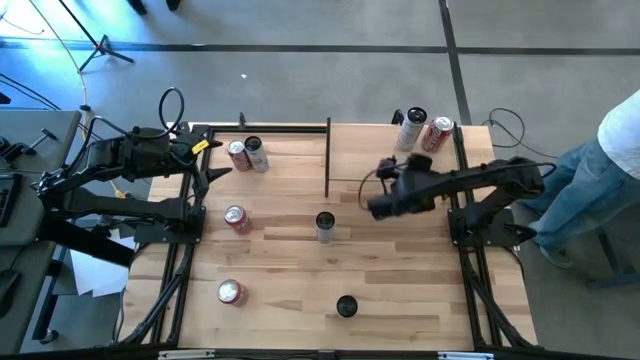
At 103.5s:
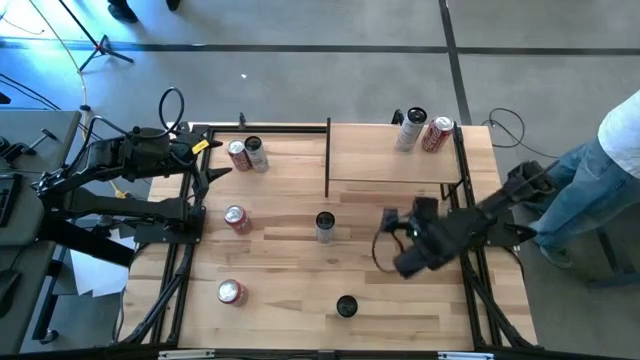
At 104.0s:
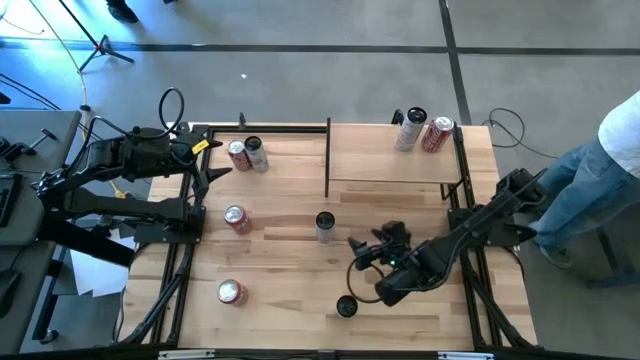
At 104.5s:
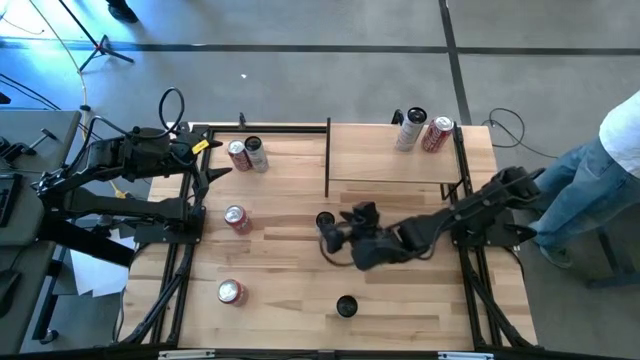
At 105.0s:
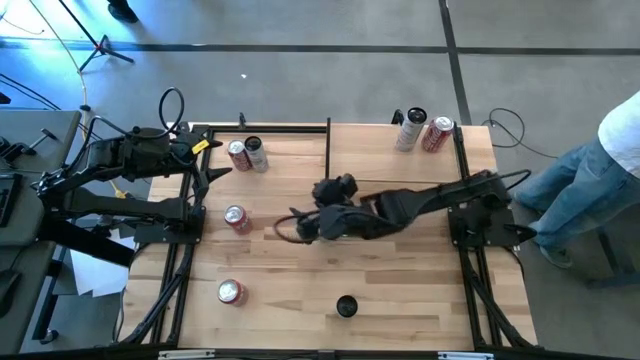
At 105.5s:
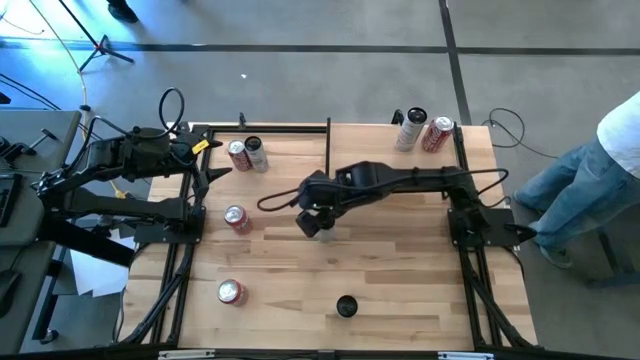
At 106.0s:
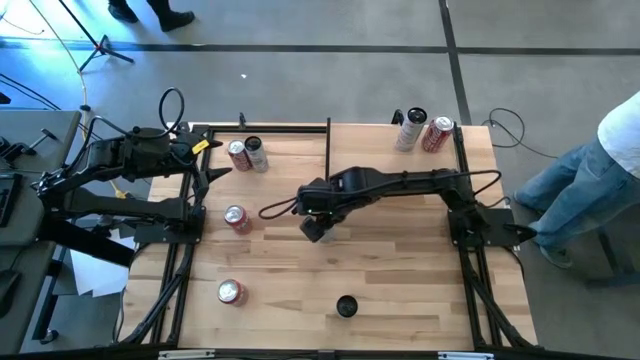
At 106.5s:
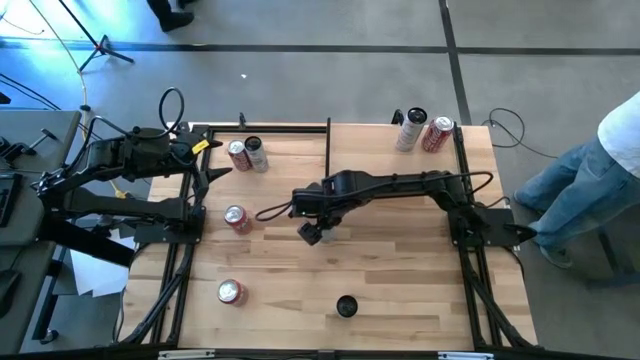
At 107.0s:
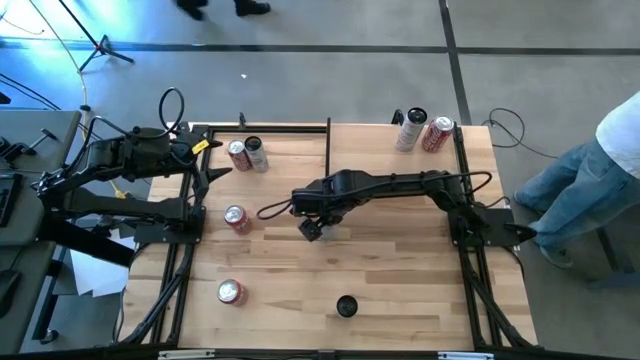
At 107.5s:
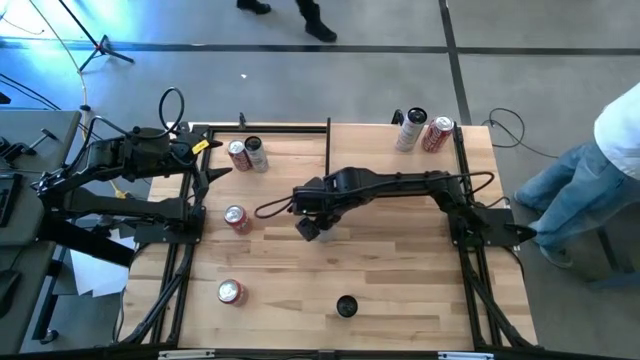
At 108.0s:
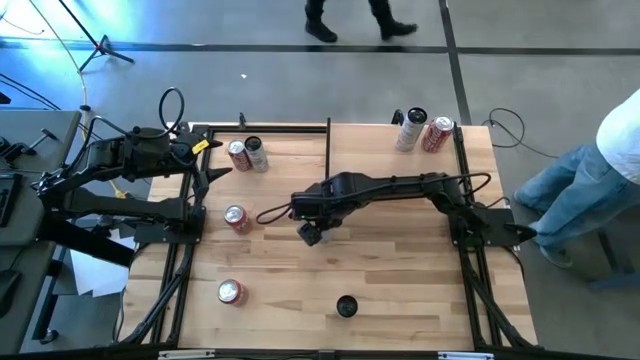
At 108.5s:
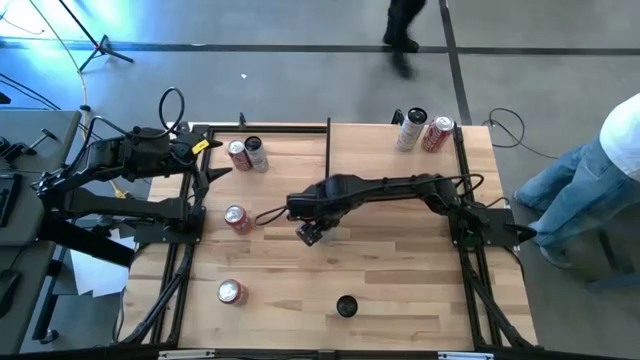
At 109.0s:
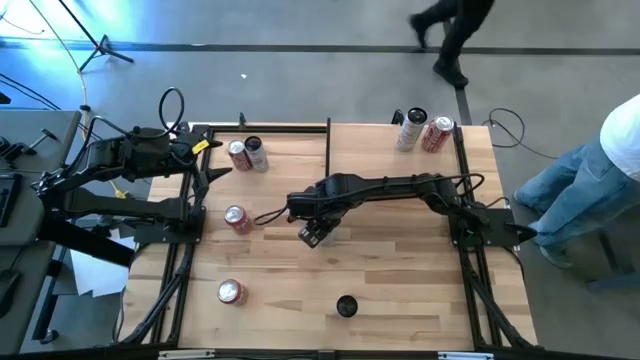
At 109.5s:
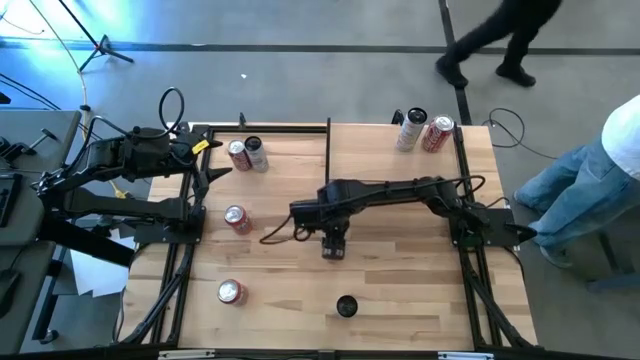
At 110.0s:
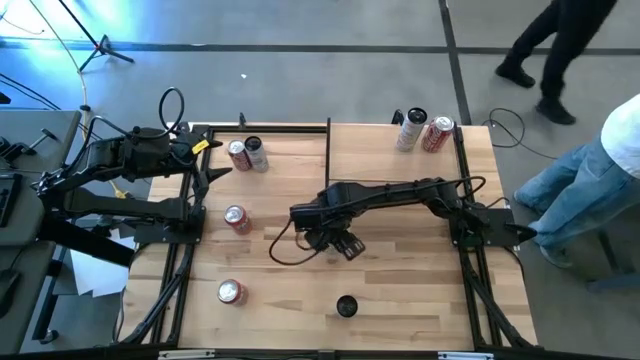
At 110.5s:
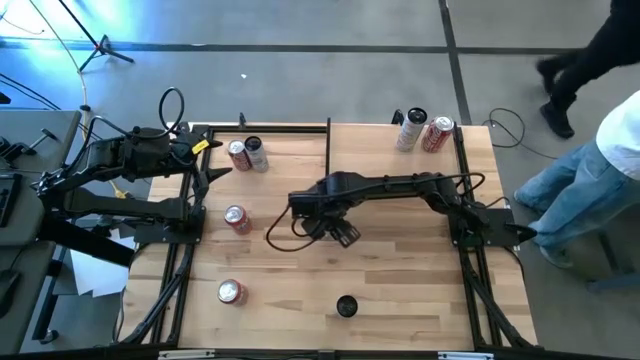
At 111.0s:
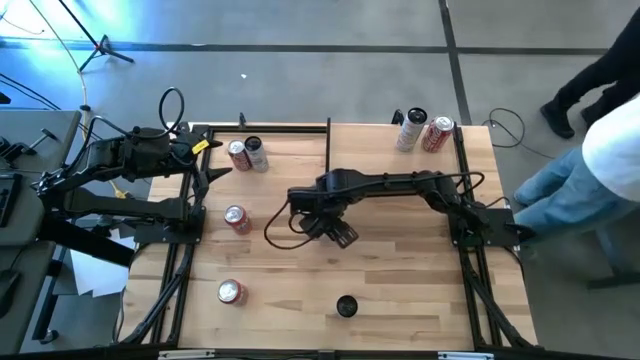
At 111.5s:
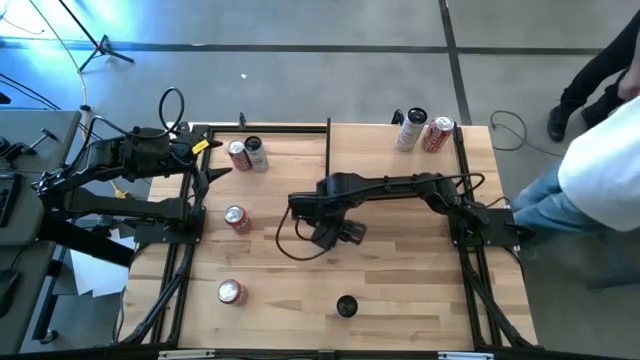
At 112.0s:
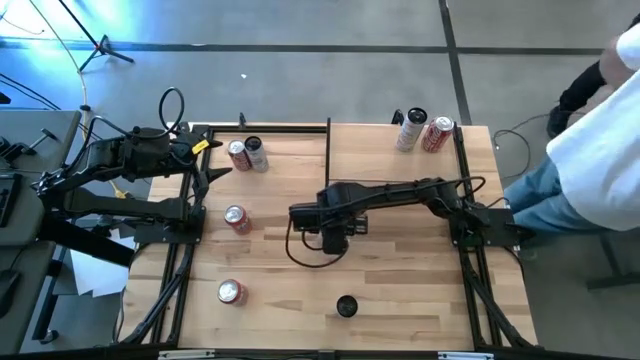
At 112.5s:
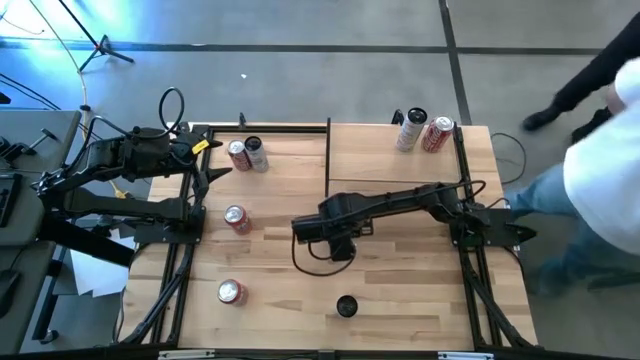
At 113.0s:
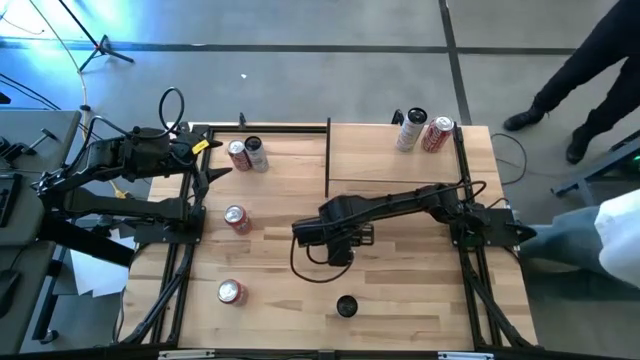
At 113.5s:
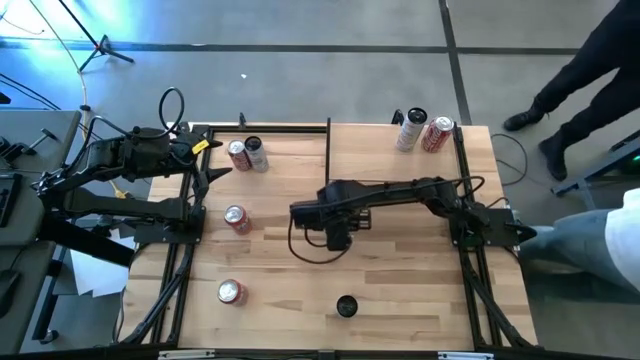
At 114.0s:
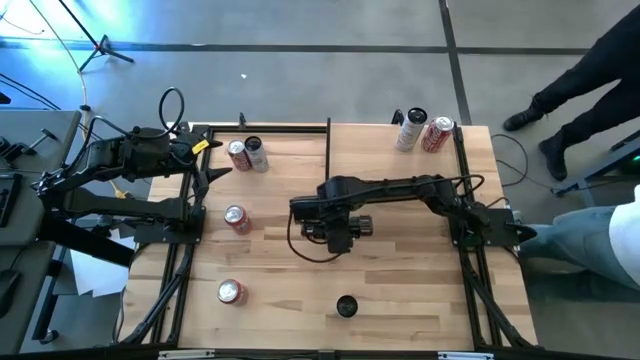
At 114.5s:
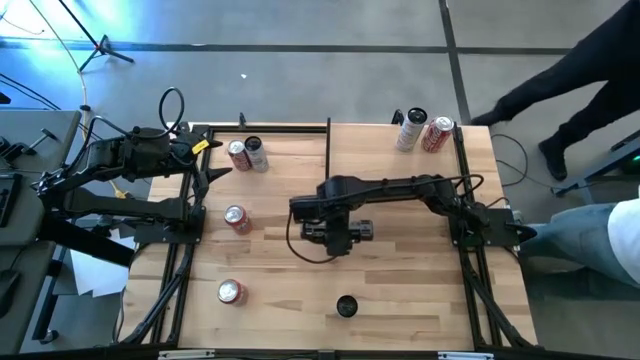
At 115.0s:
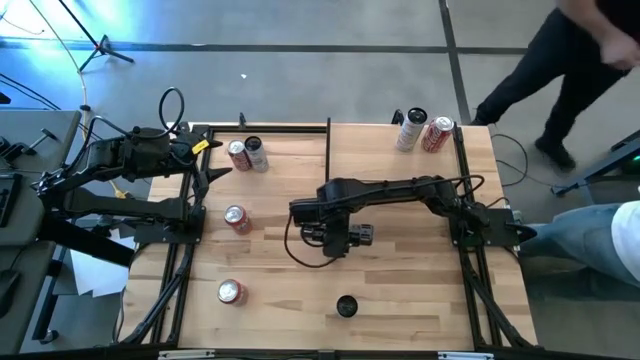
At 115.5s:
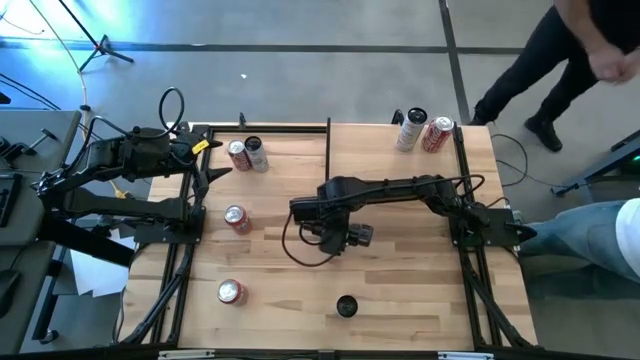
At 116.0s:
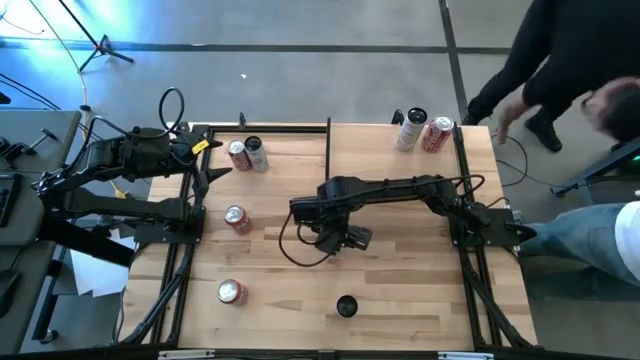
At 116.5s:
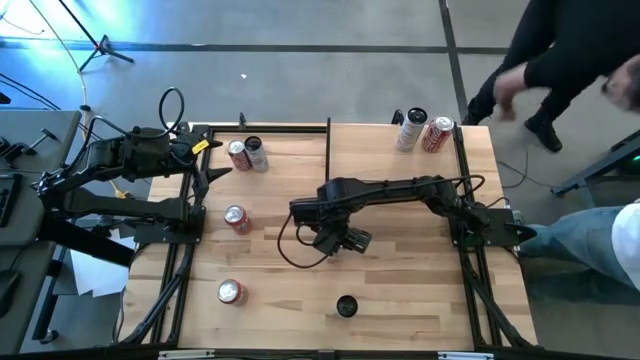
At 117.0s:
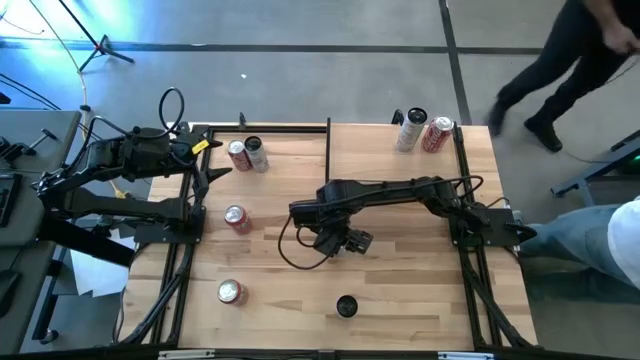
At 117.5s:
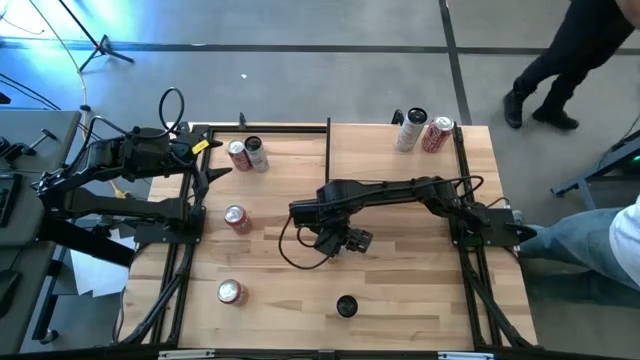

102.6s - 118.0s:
Task: Place canned beverage on shelf
Put the white soda can on the shelf

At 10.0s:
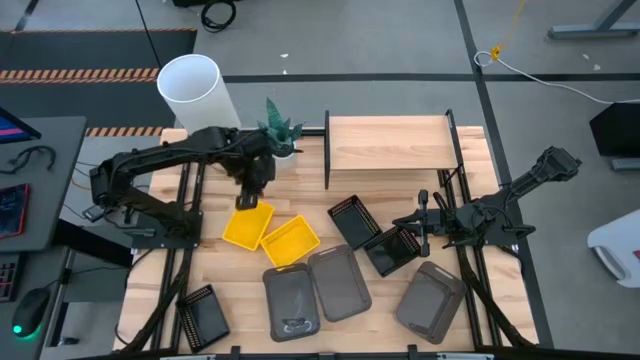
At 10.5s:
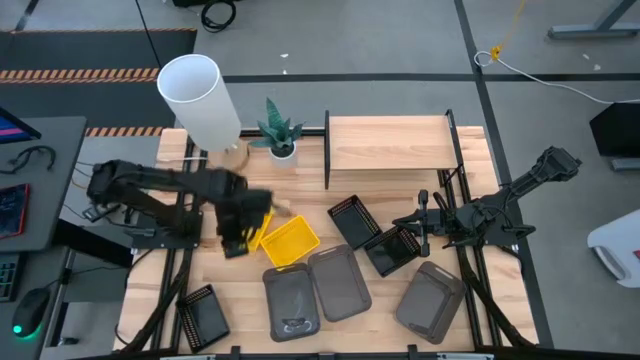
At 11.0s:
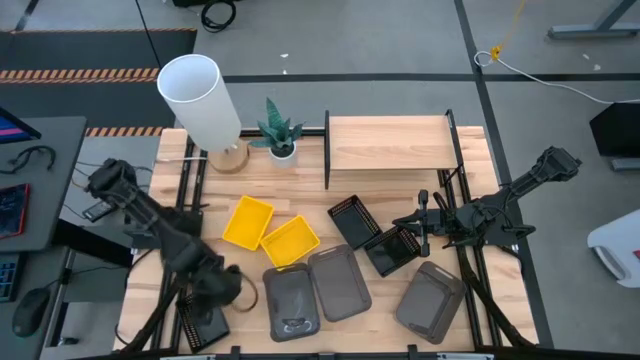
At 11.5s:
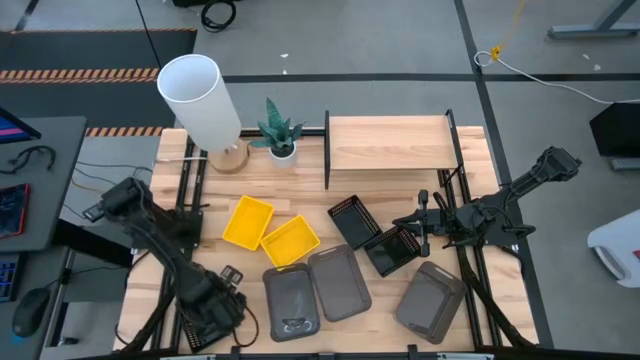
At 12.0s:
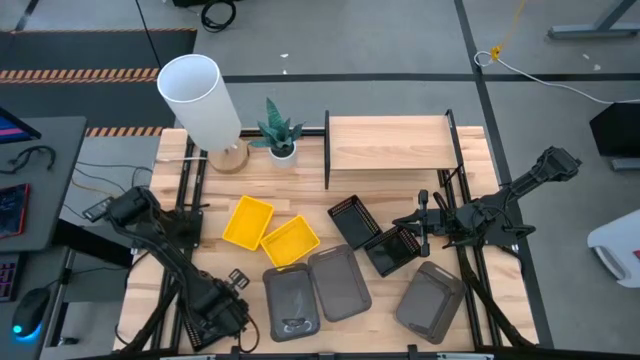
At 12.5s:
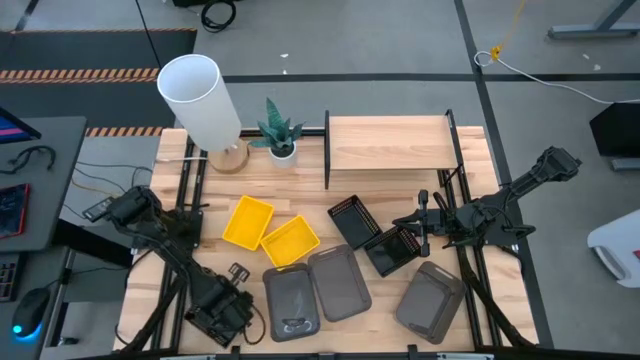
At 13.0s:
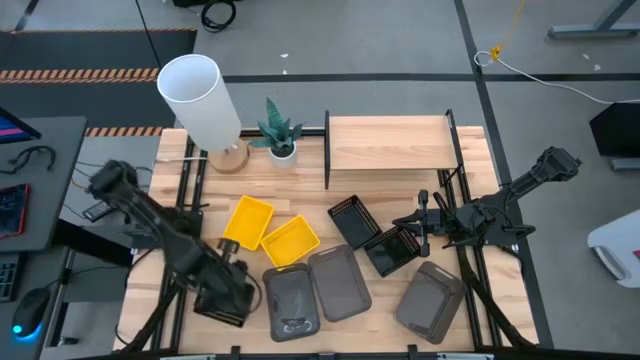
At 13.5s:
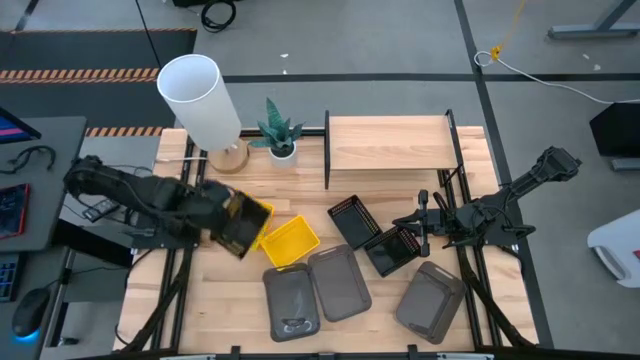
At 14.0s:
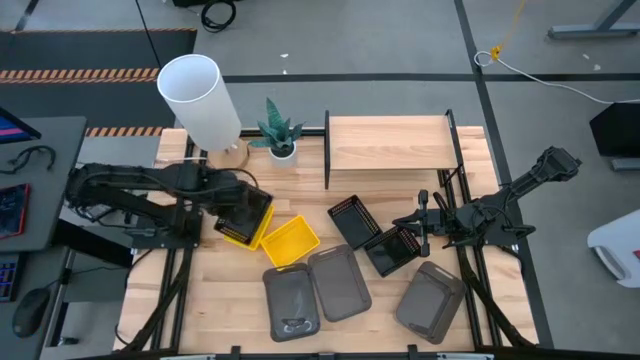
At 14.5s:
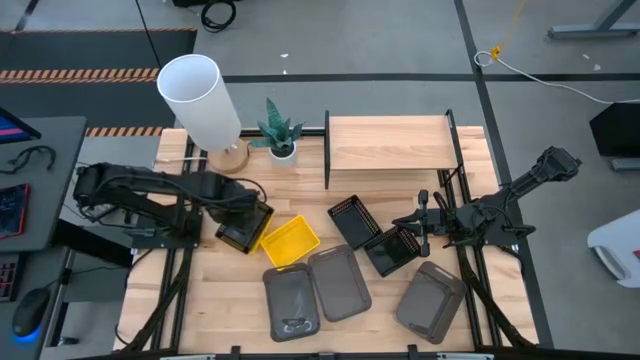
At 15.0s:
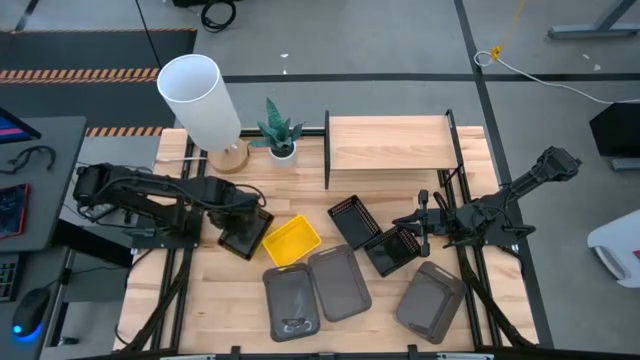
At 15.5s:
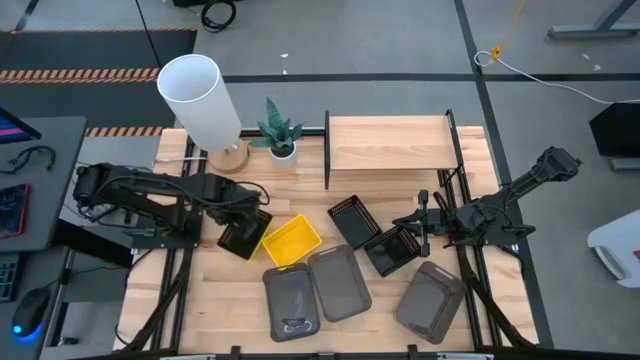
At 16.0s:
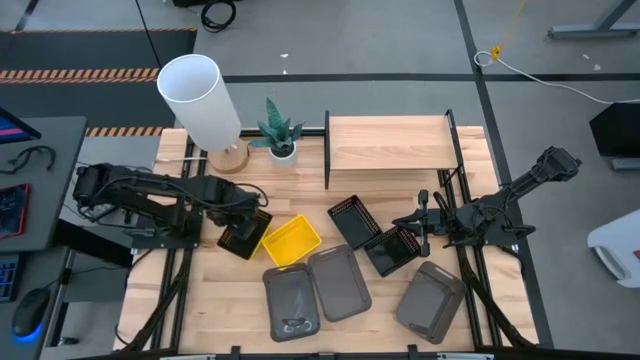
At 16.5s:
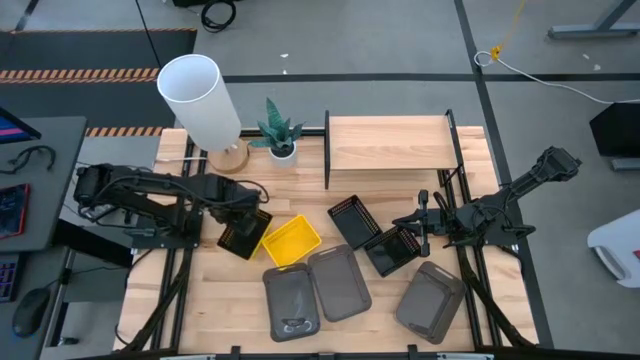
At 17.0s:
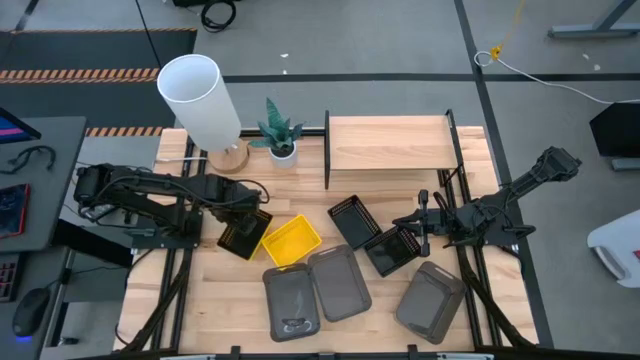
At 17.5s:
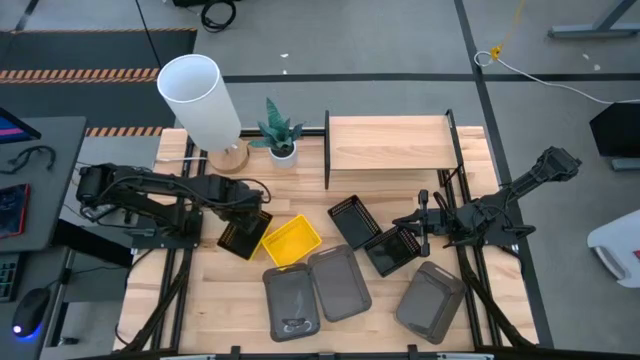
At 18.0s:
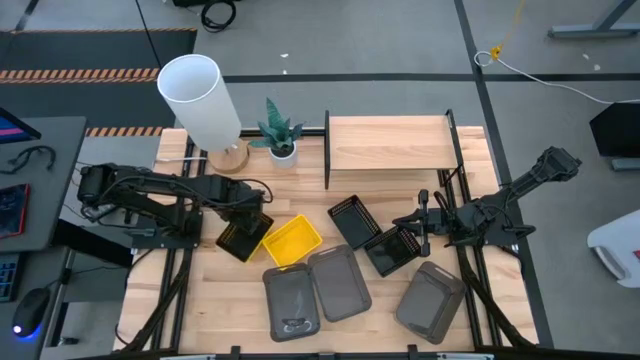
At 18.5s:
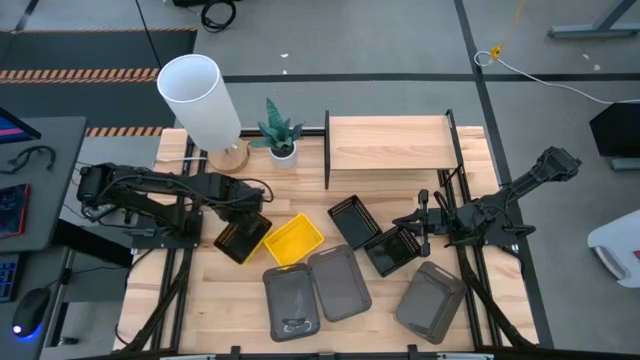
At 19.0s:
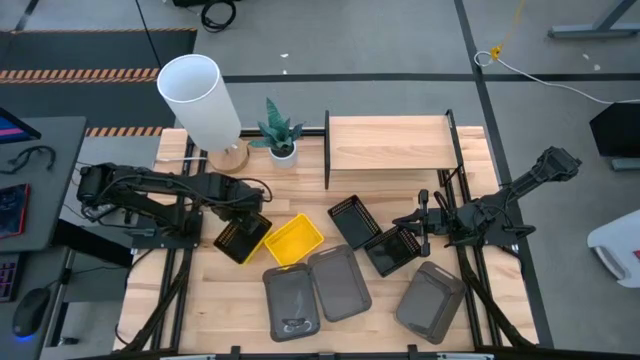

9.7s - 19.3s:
Task: Stack baskets on shelf by color
Stack the bottom black bin on top of the top right black bin
